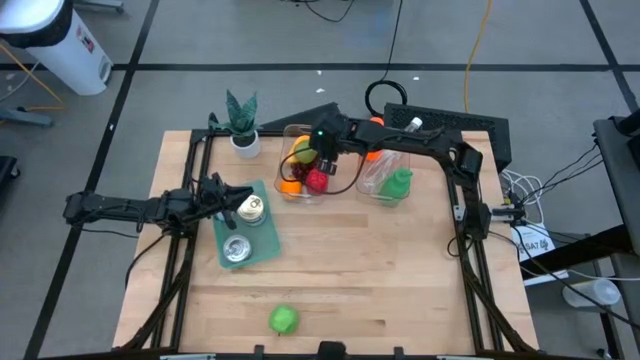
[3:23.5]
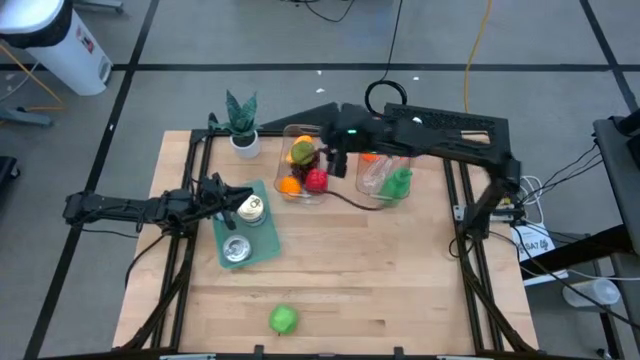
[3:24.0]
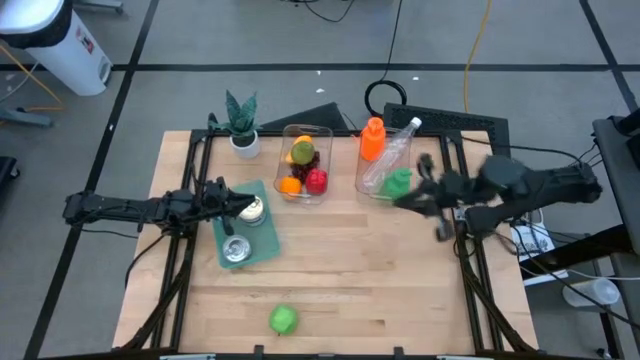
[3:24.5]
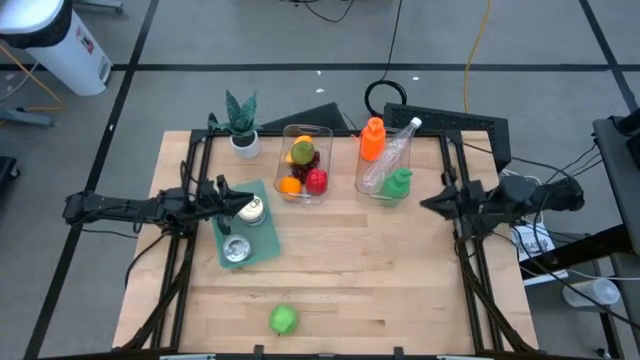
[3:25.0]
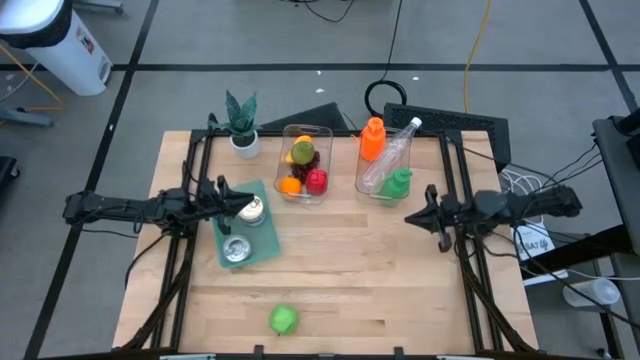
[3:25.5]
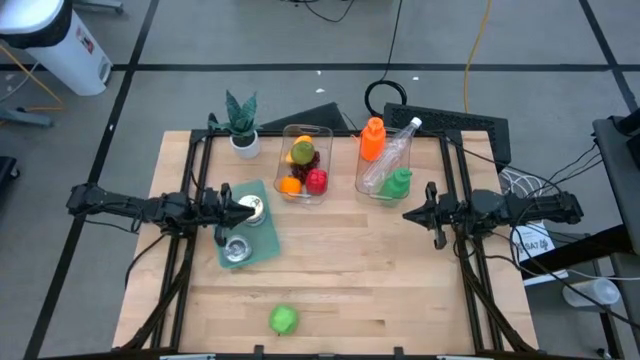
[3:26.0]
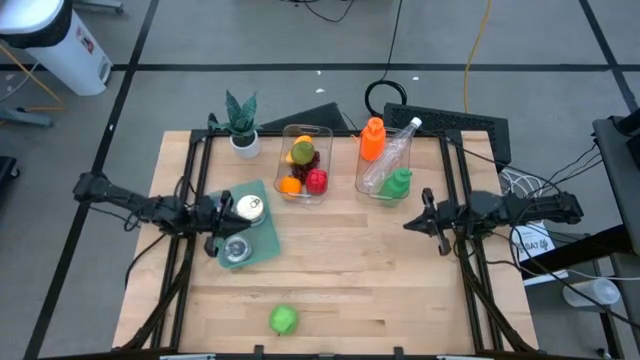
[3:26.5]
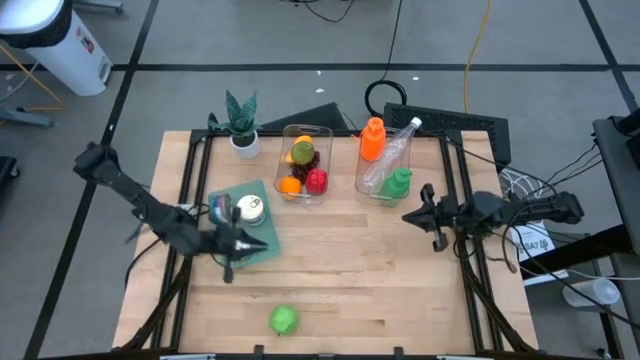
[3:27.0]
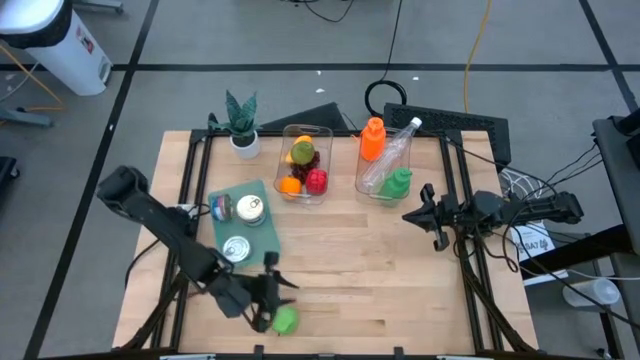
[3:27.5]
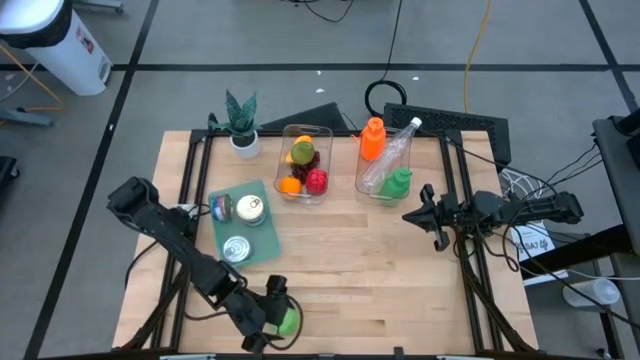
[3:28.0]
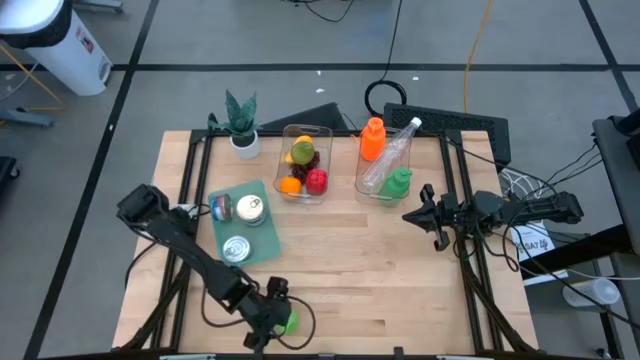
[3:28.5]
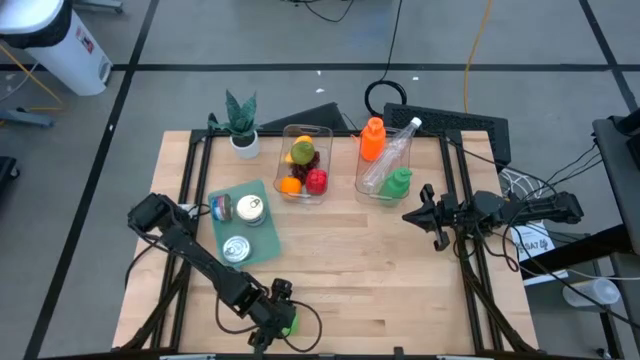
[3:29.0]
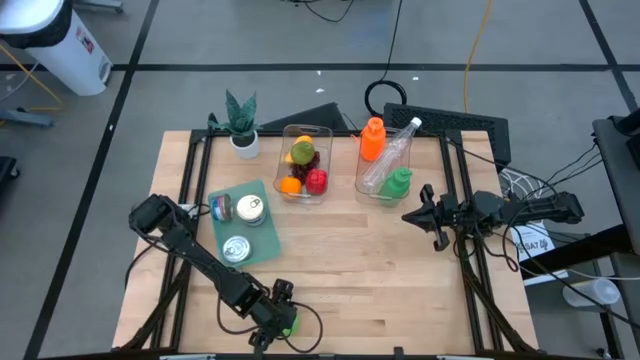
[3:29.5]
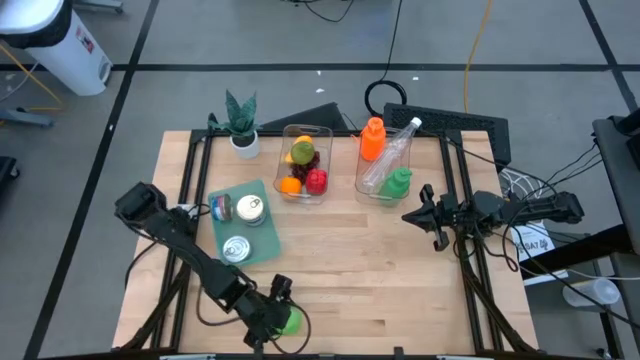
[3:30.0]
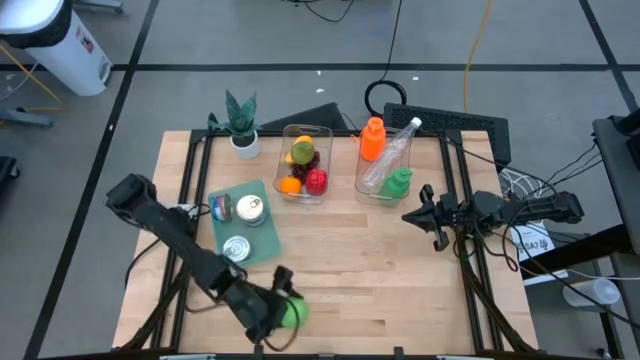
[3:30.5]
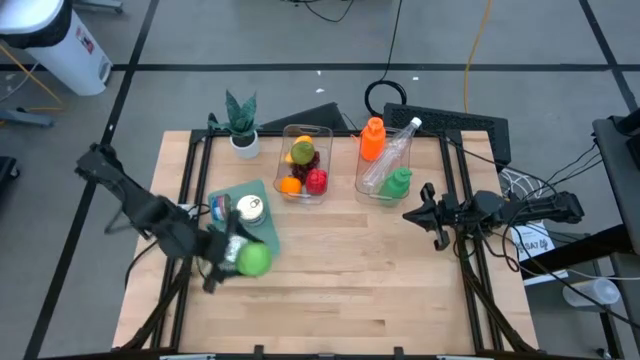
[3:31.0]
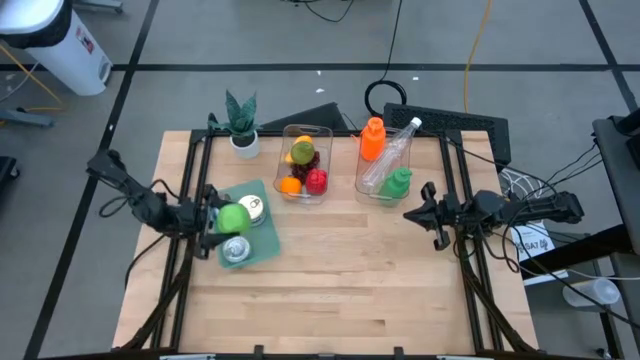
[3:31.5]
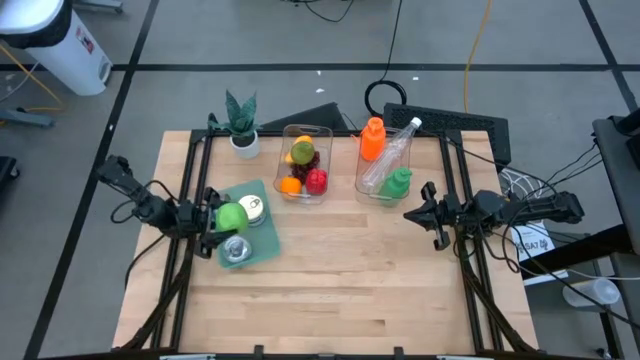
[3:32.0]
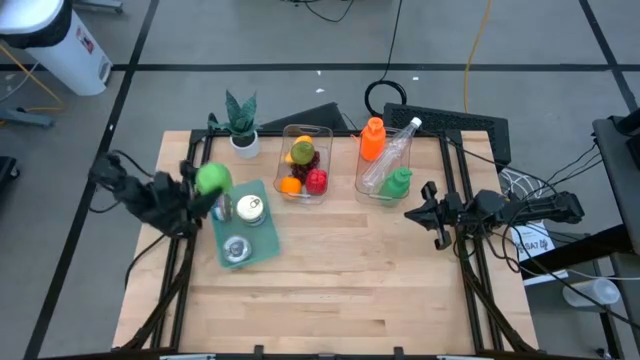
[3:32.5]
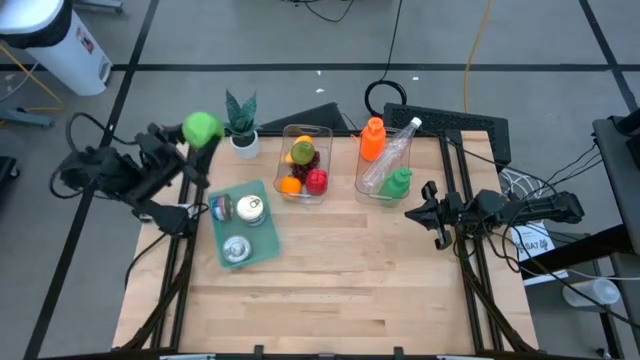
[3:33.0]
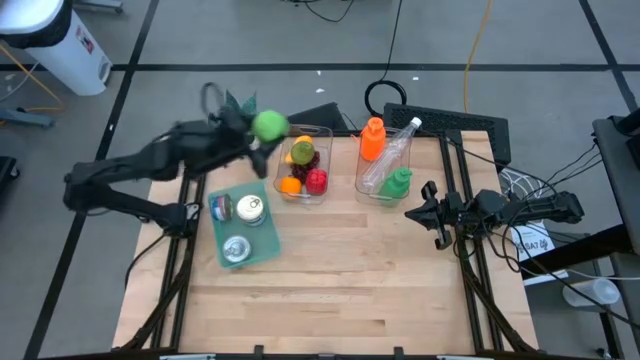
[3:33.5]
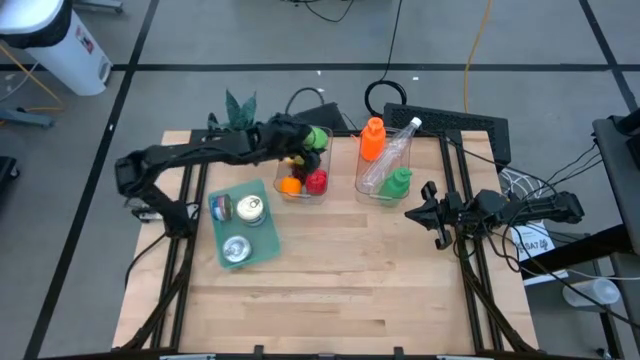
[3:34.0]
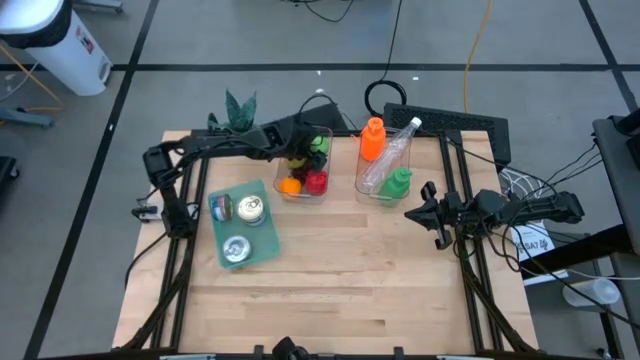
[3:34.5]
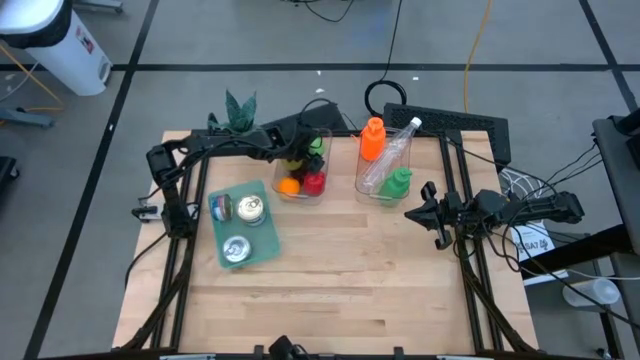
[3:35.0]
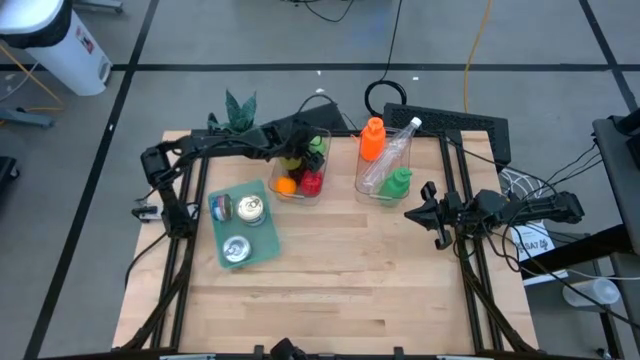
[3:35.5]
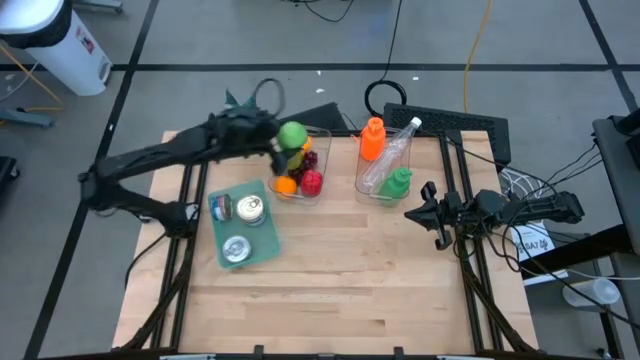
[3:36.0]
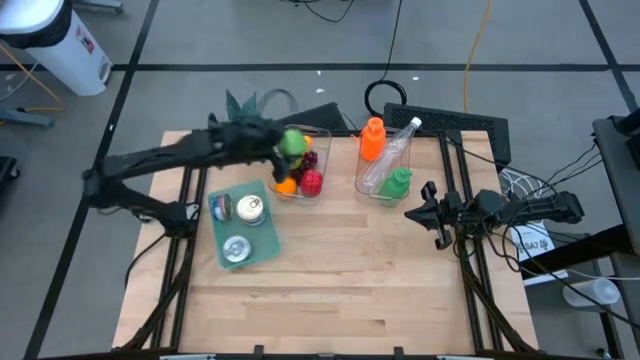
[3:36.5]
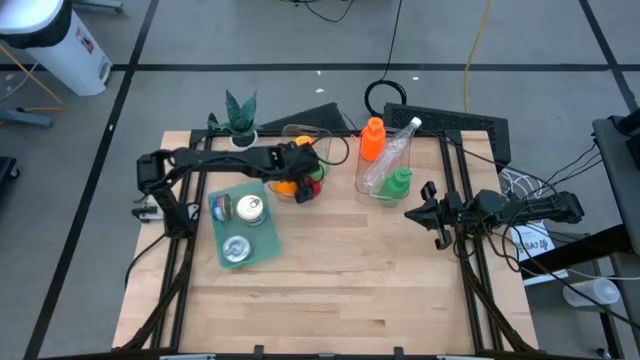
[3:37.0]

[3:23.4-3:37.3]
Task: Pick & Place Food Item
Put the green apple into the left transparent bin

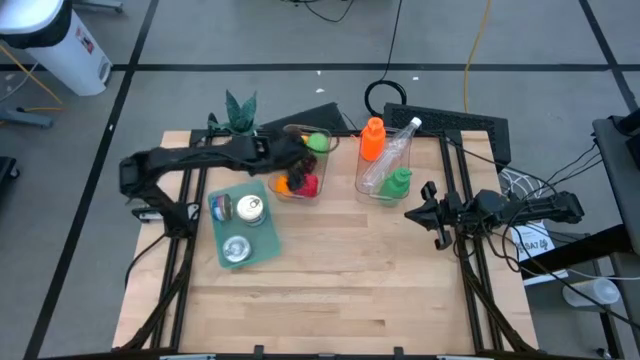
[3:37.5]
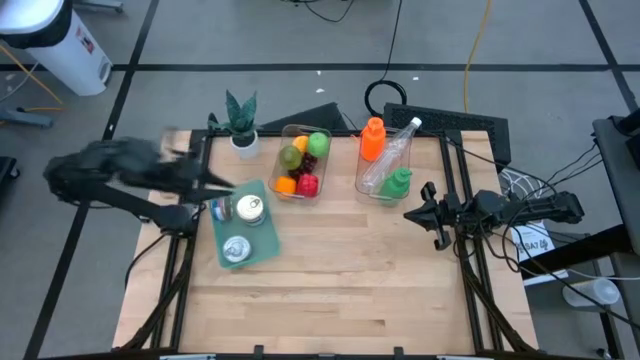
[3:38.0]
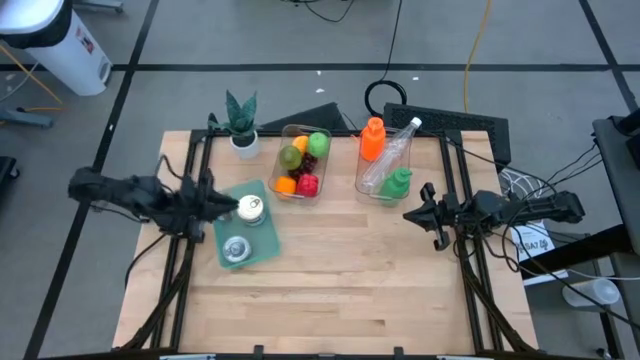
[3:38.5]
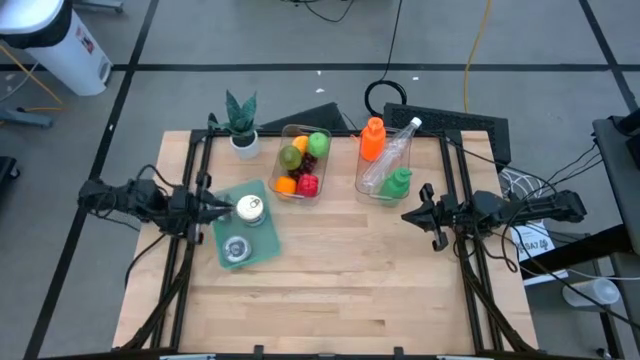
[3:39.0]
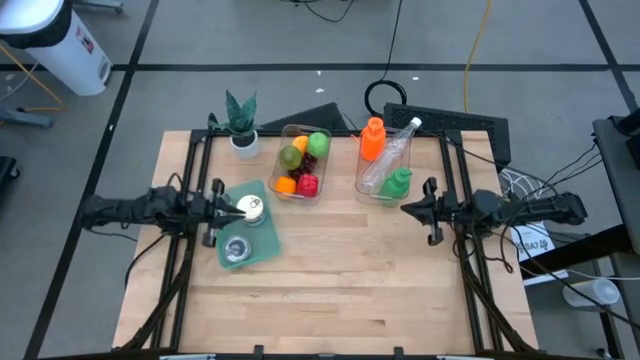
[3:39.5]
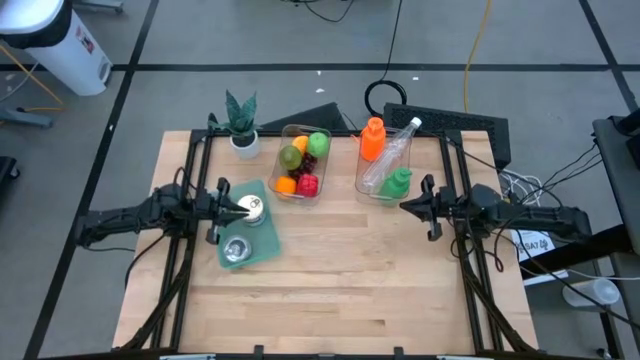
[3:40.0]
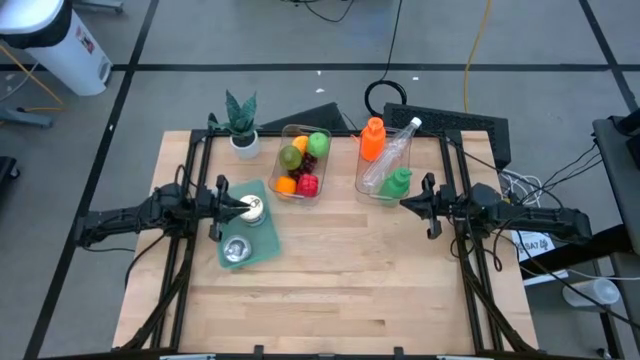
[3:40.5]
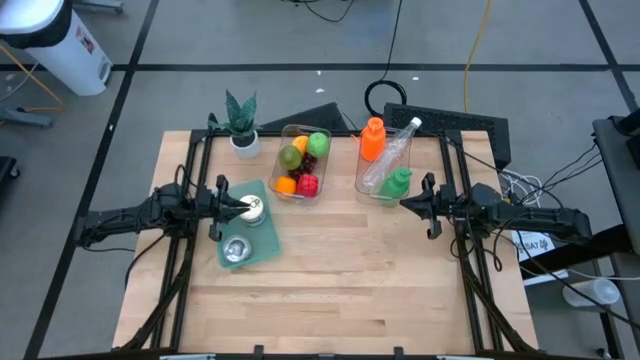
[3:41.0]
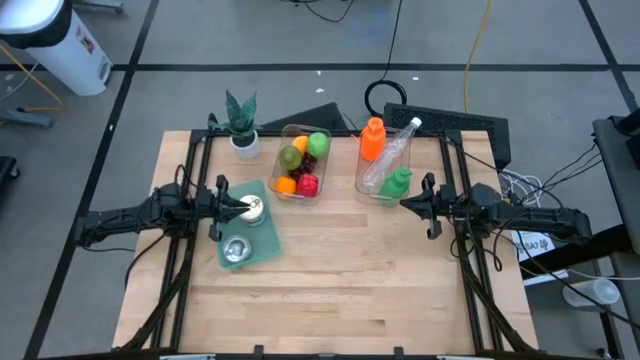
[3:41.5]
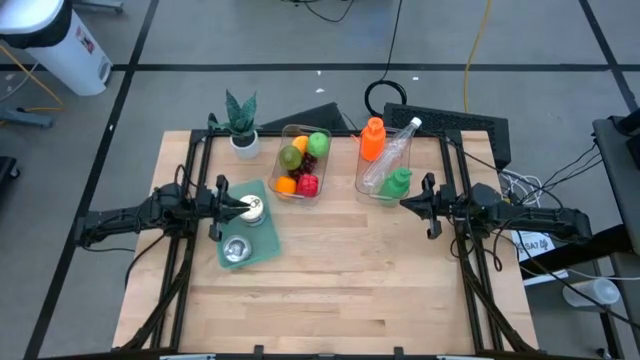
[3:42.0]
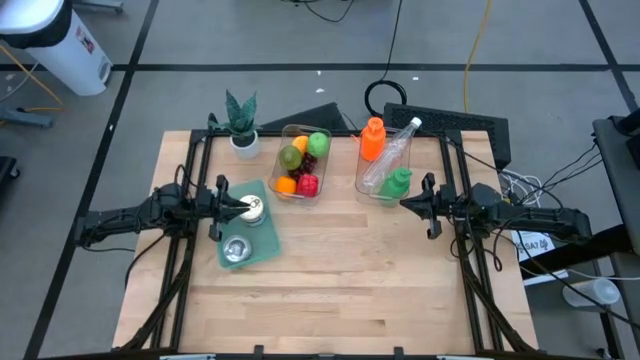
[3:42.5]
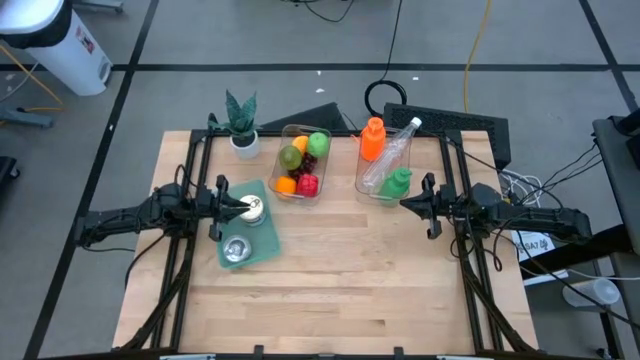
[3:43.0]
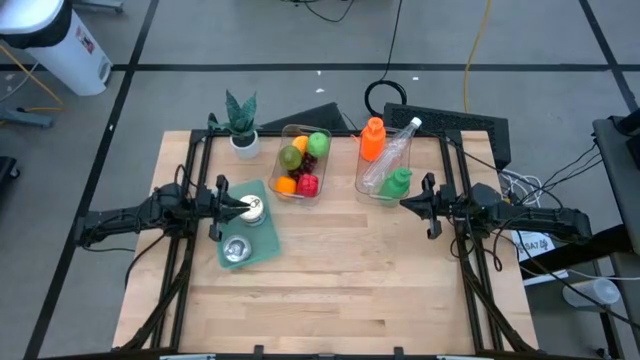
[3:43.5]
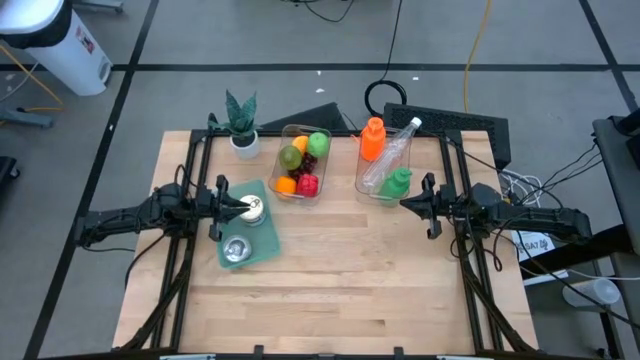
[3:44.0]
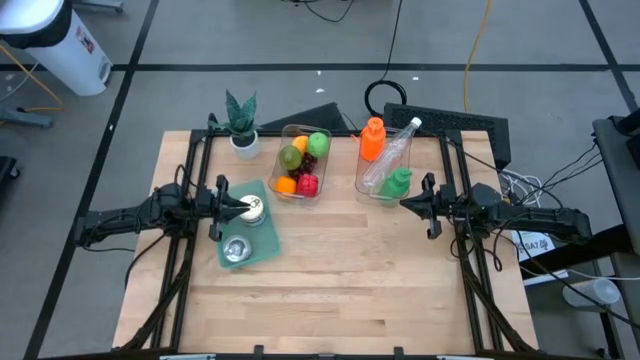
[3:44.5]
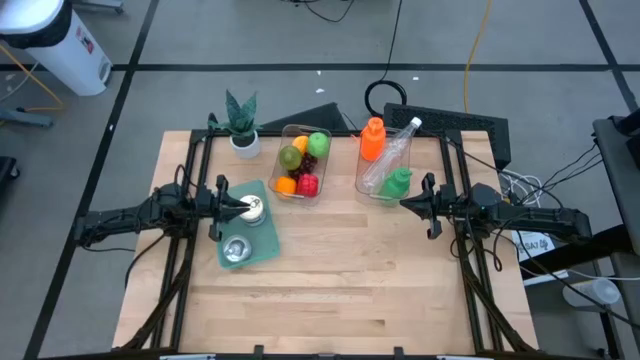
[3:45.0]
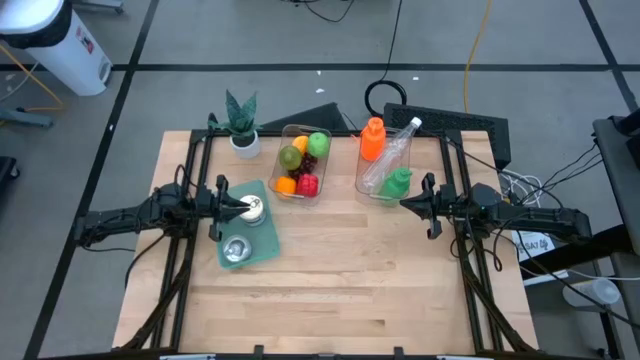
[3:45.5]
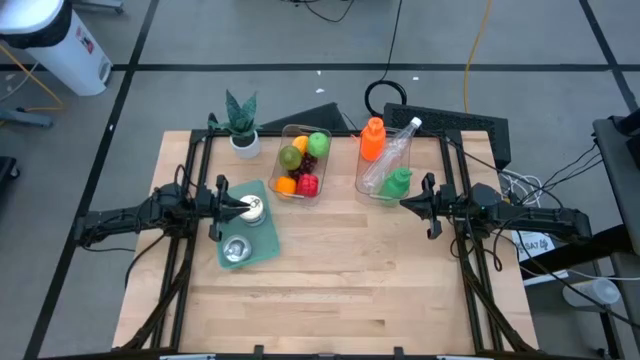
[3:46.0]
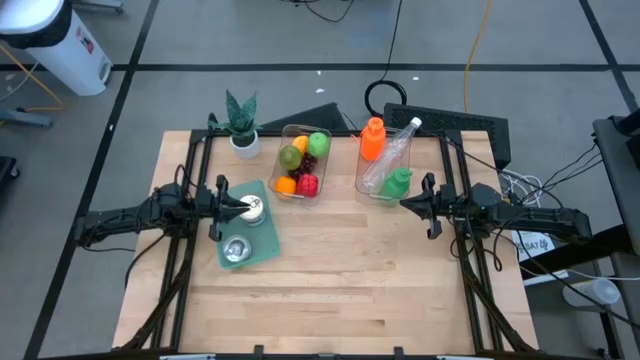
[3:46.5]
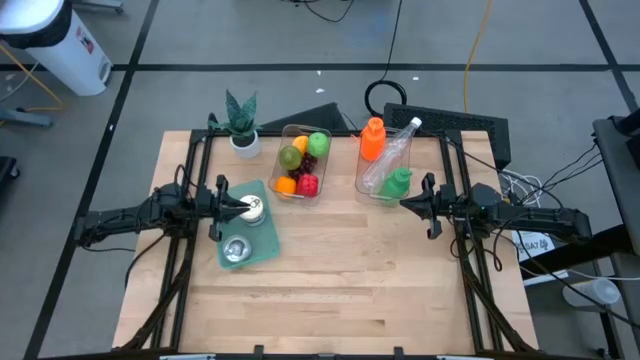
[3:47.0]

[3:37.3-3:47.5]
Return to Home Position
